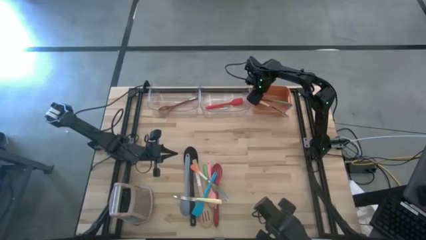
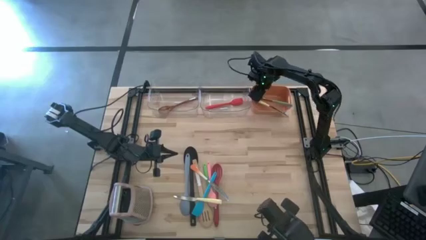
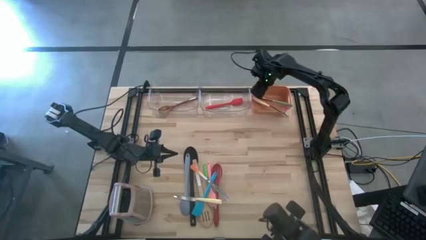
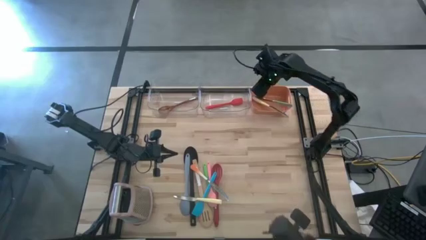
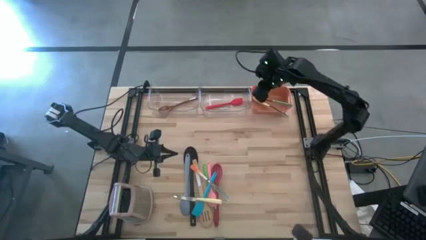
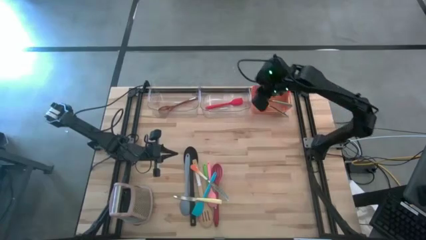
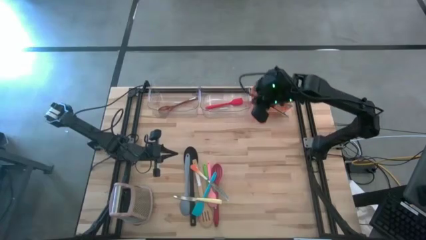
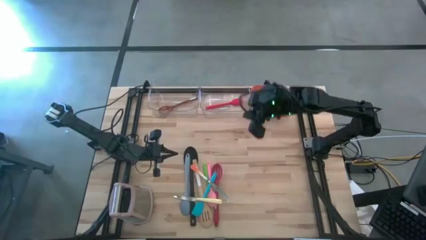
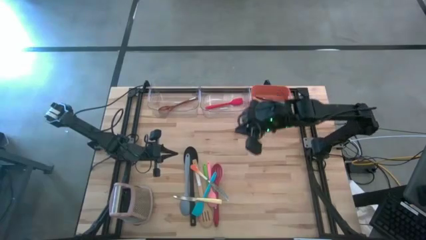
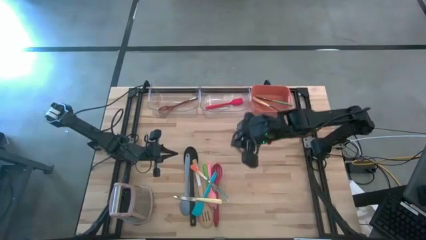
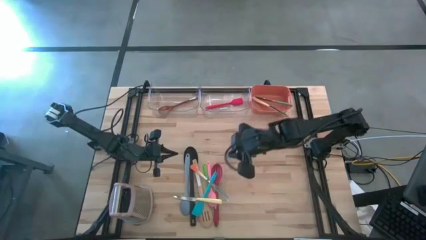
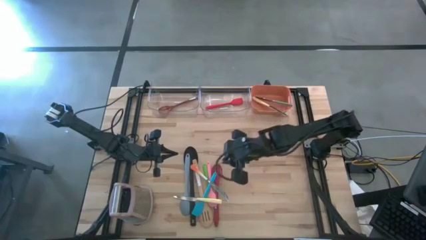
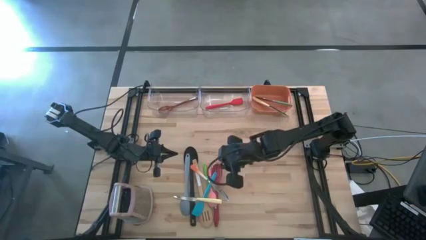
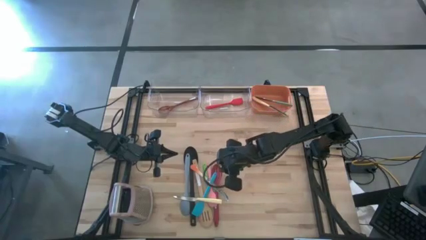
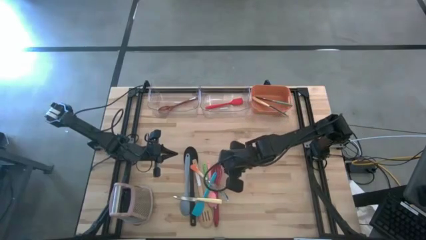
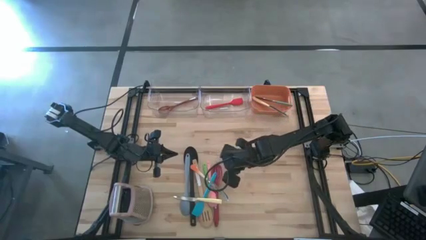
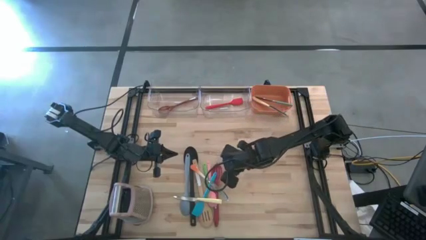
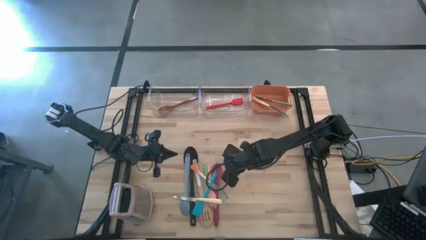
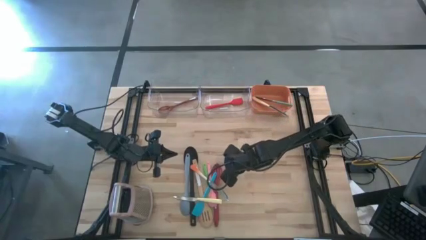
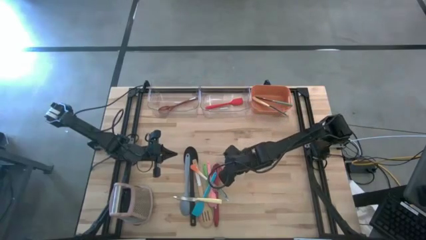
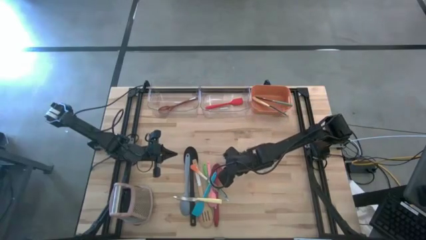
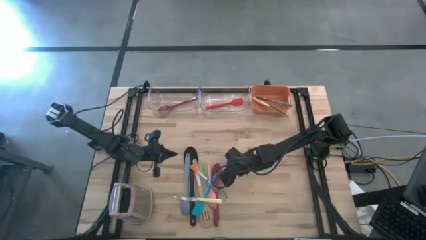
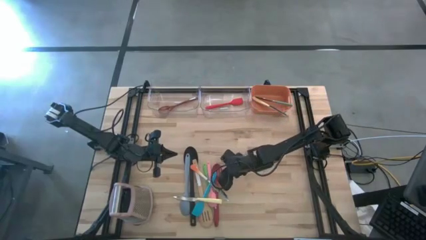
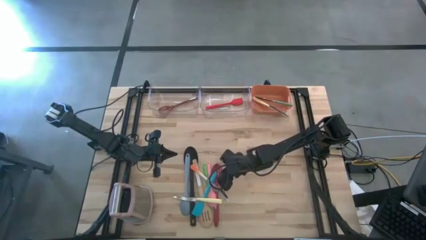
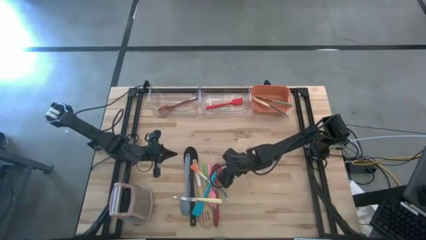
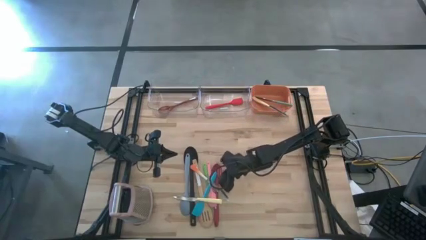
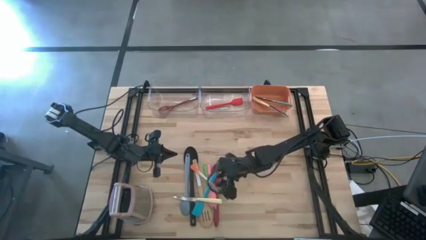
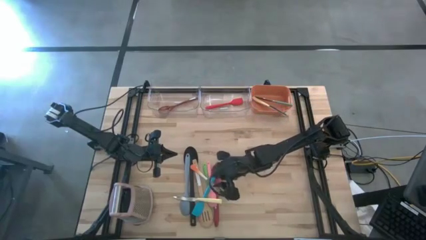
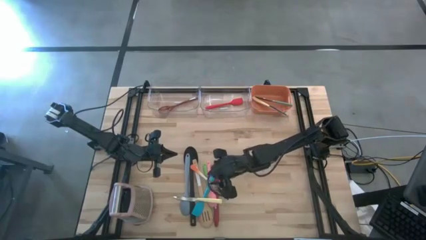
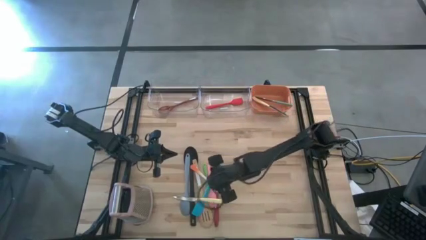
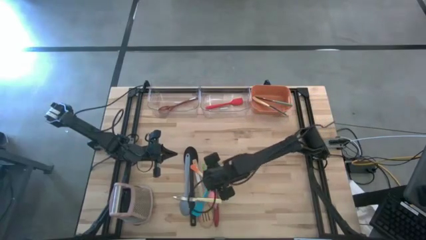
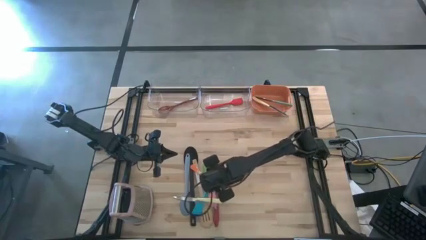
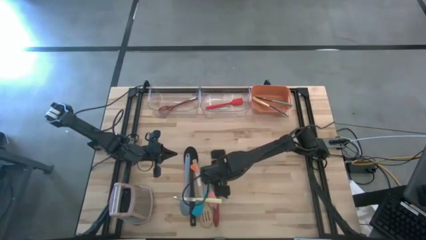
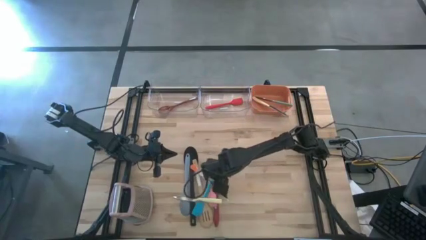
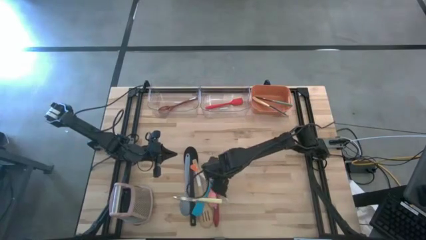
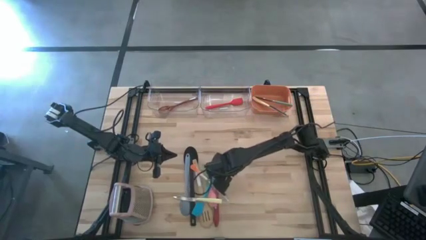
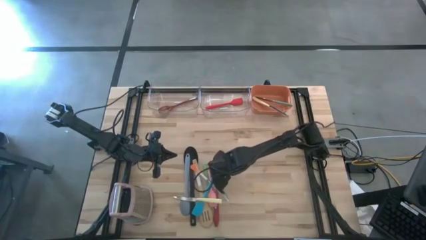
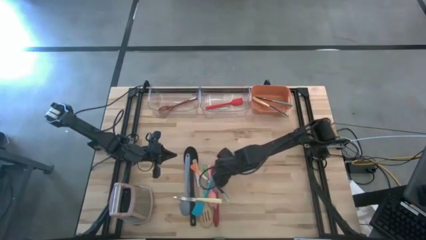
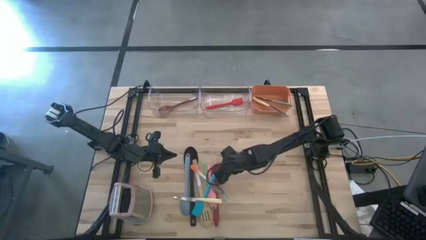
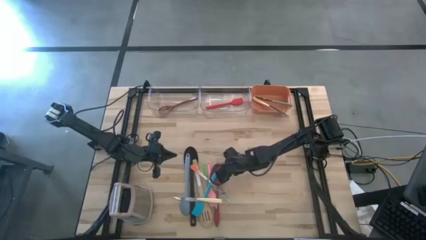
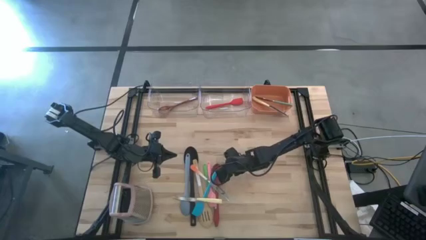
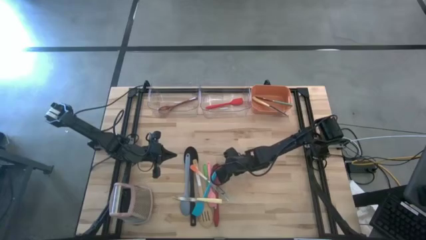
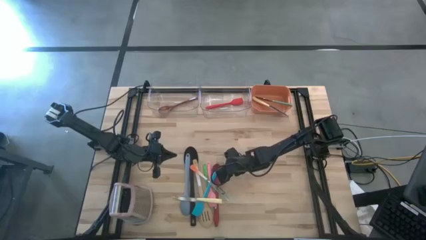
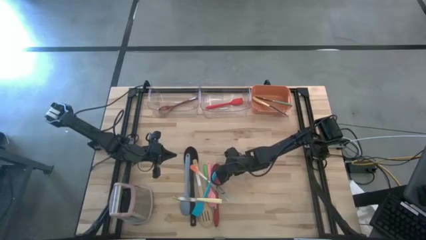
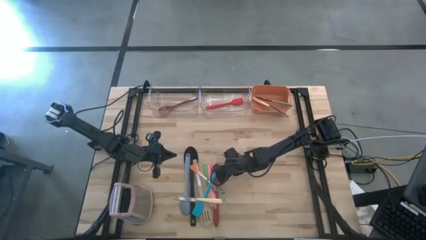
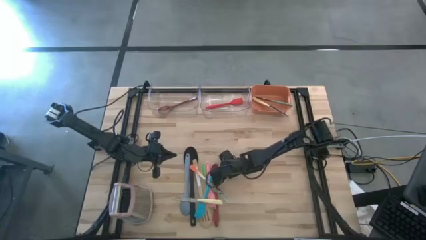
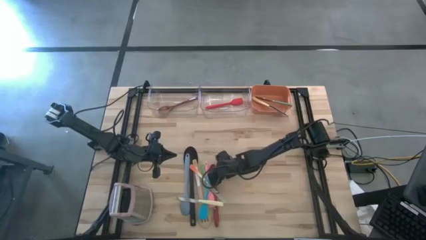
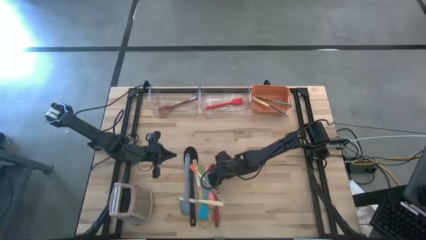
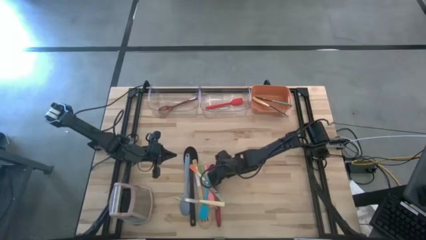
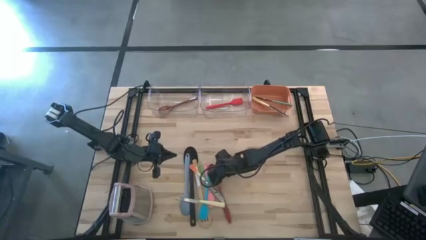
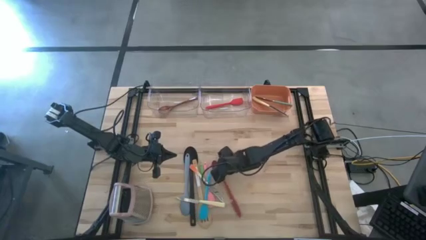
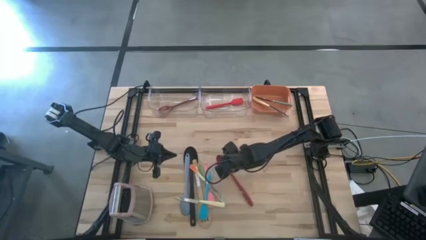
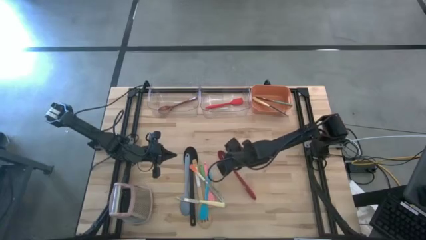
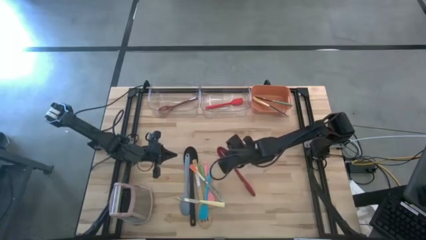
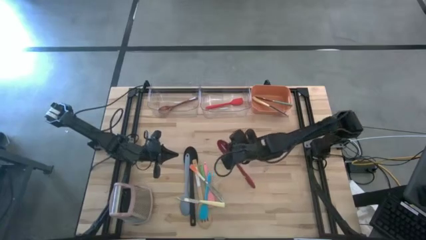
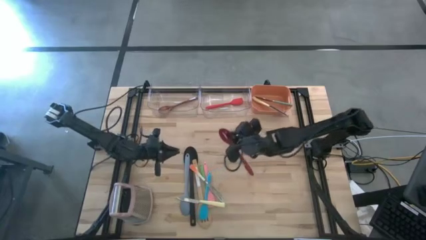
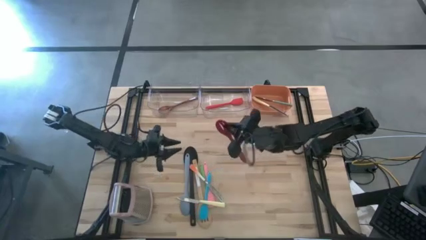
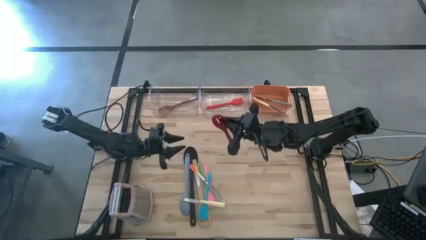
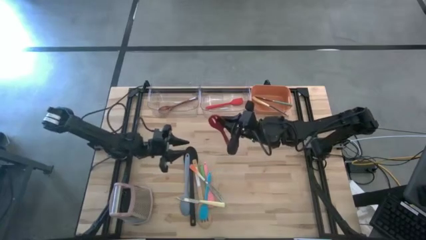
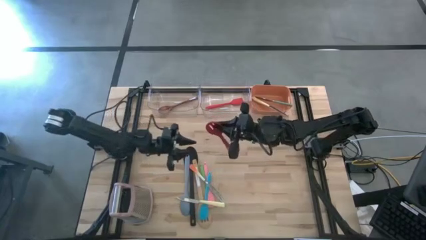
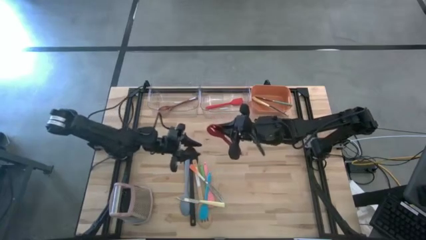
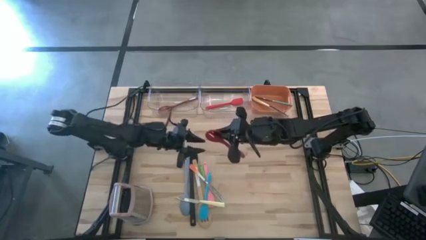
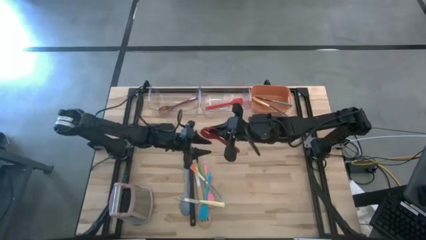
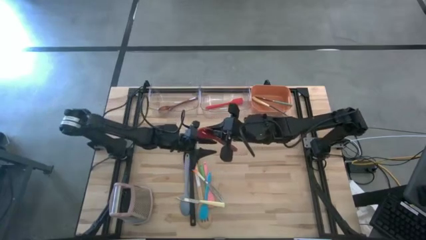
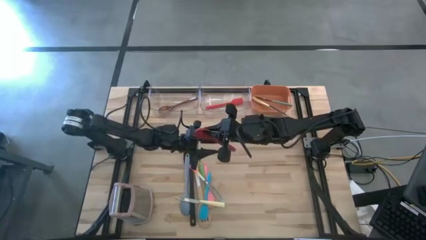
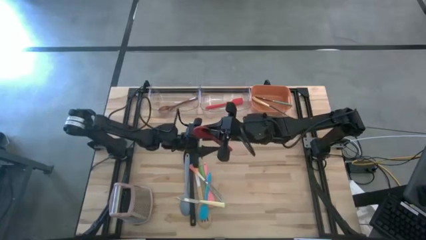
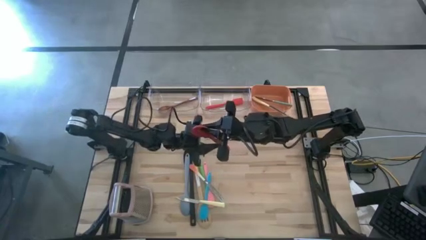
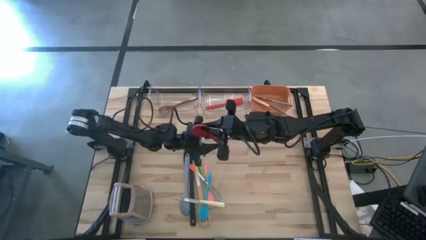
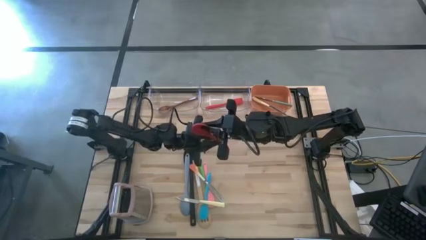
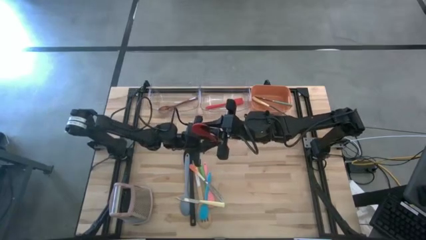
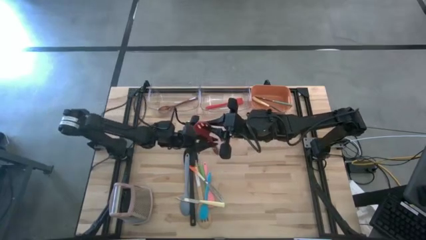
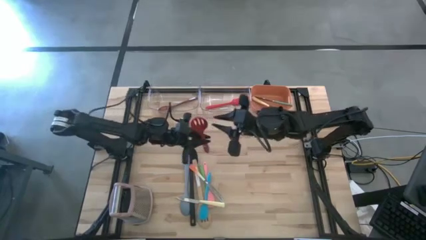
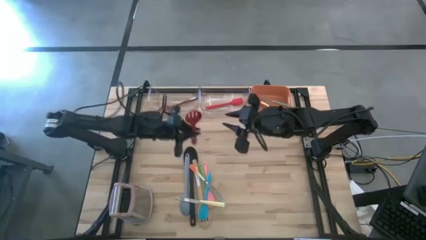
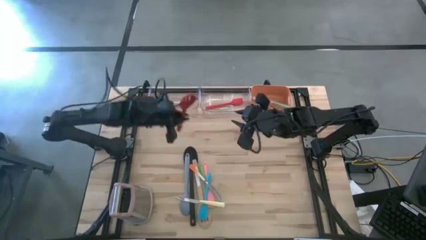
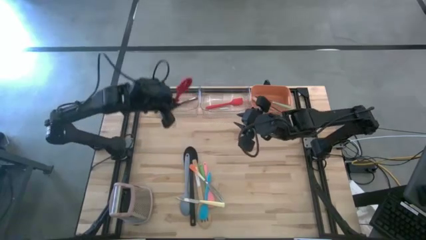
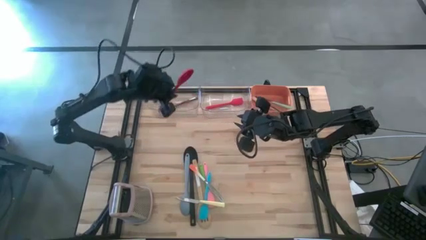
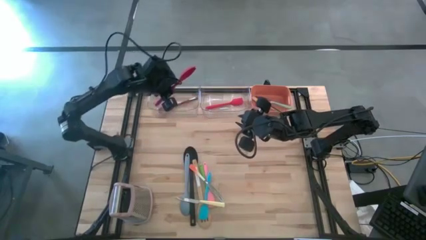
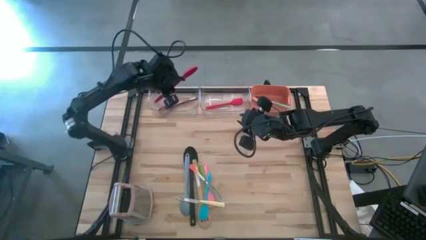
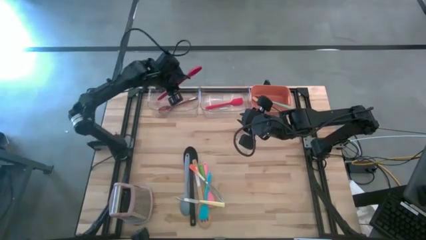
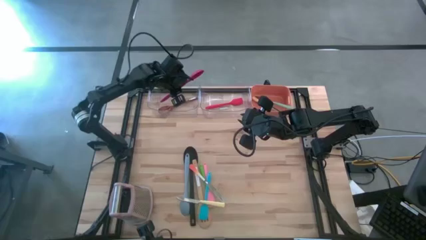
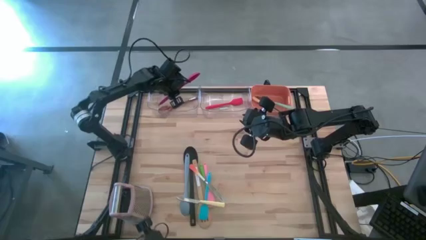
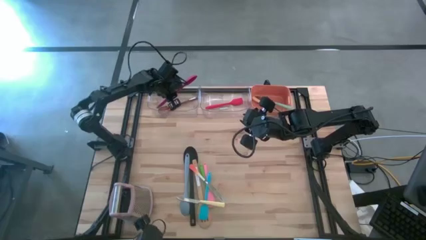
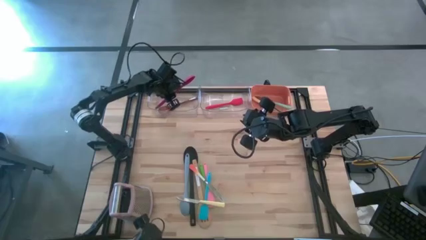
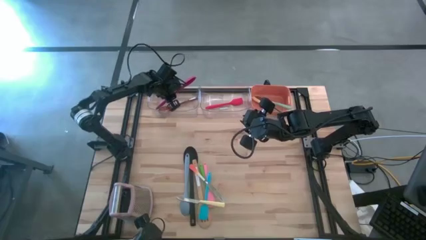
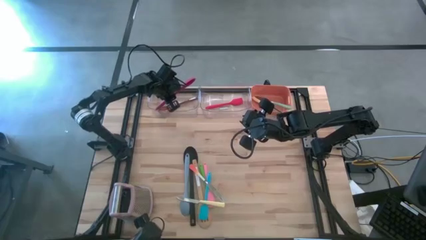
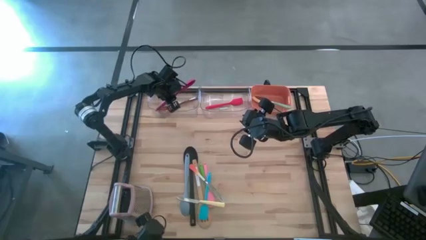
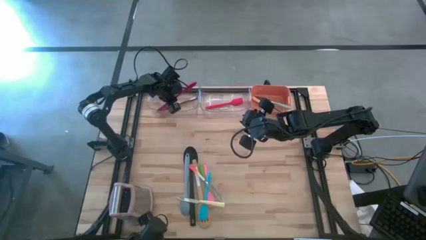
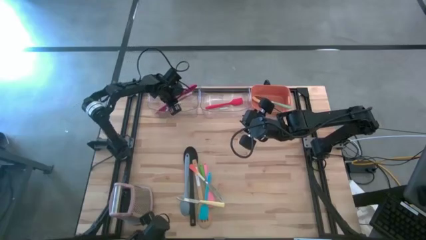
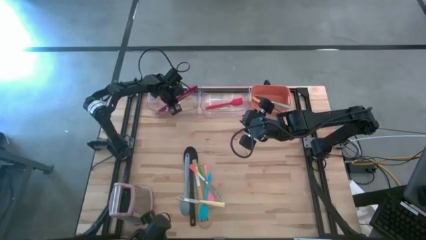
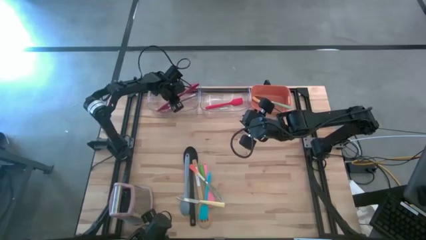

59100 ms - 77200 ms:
Task: Pick & Place Kitchen Items
Put the red serving spoon into the left transparent bin
